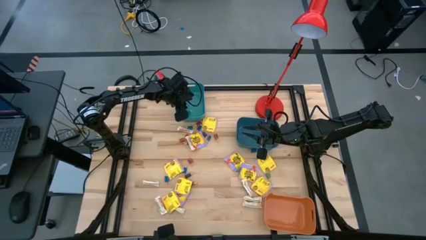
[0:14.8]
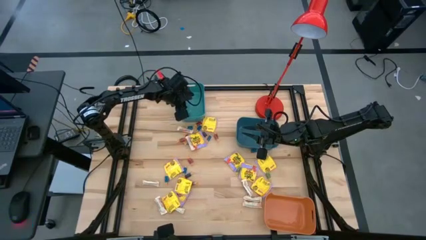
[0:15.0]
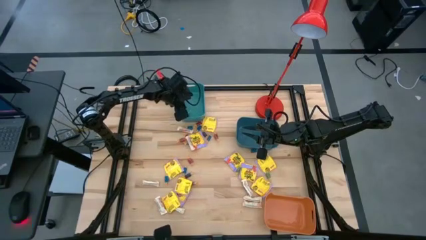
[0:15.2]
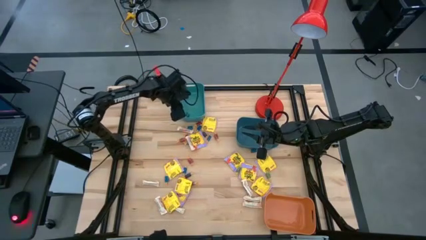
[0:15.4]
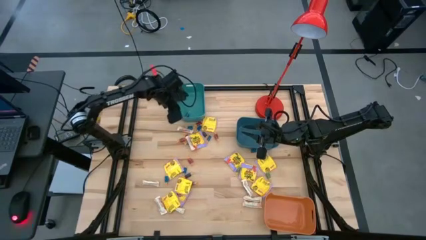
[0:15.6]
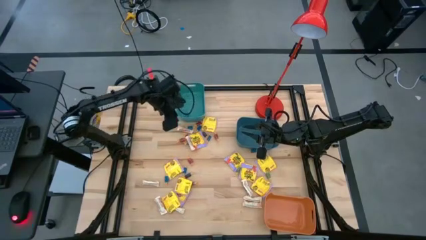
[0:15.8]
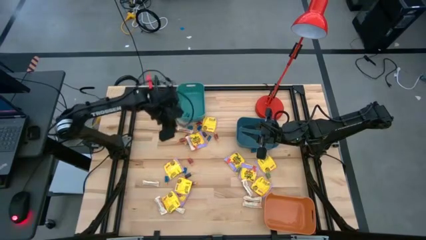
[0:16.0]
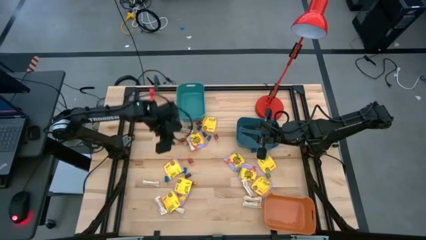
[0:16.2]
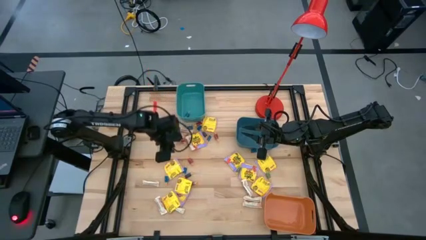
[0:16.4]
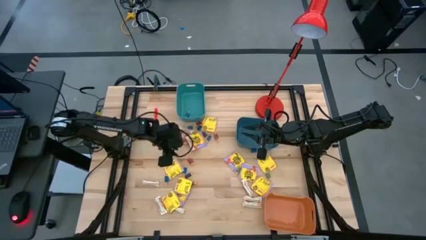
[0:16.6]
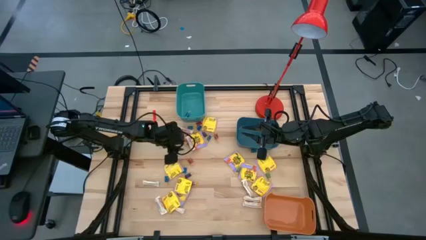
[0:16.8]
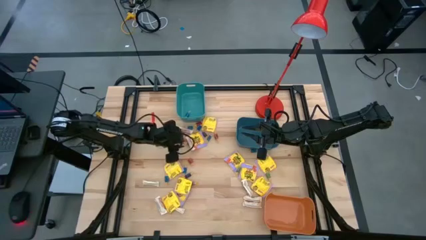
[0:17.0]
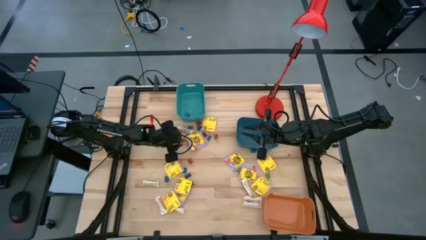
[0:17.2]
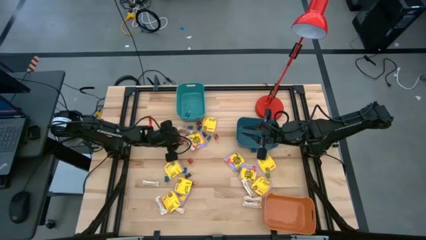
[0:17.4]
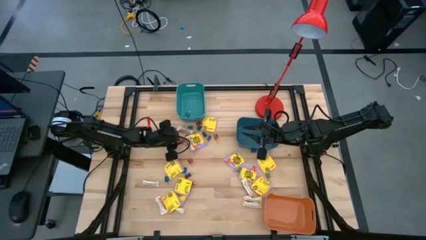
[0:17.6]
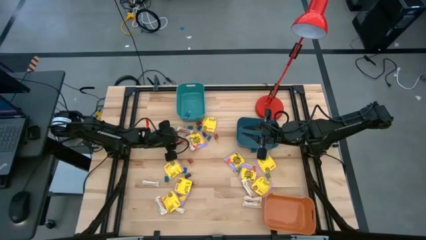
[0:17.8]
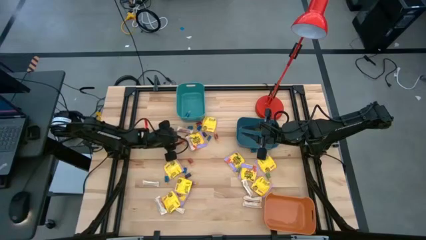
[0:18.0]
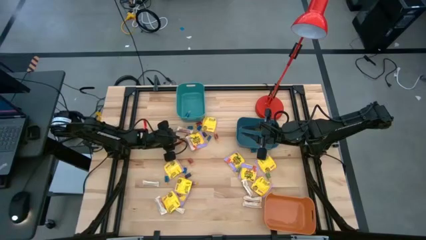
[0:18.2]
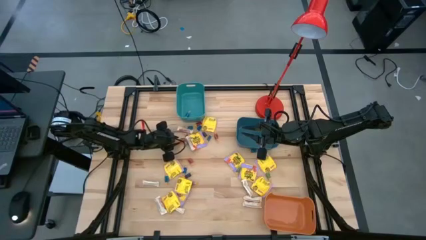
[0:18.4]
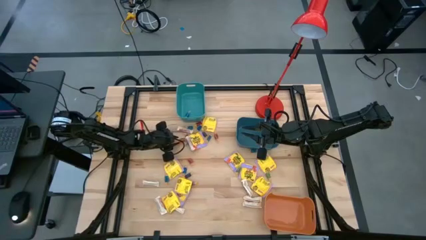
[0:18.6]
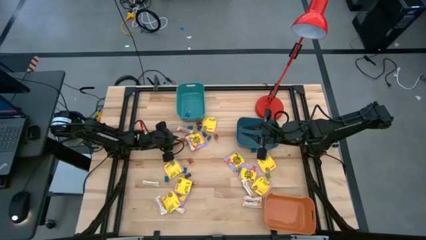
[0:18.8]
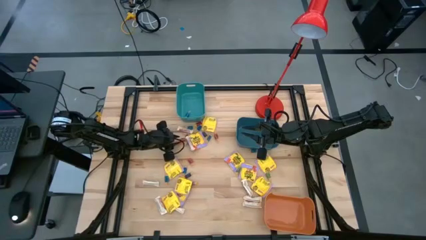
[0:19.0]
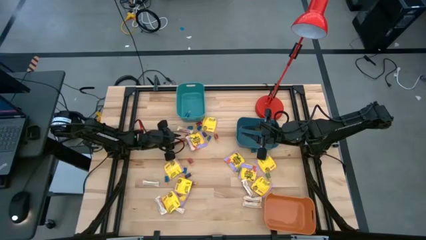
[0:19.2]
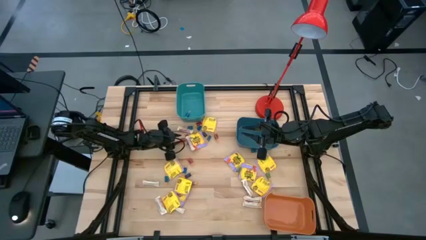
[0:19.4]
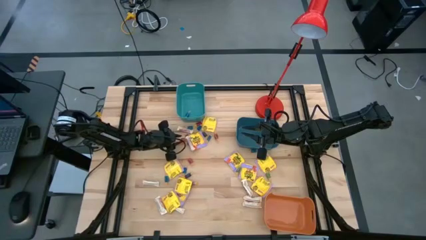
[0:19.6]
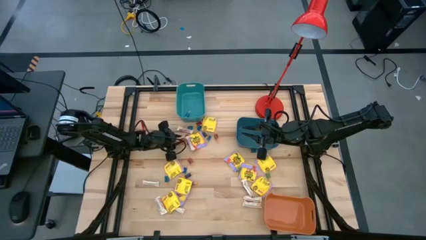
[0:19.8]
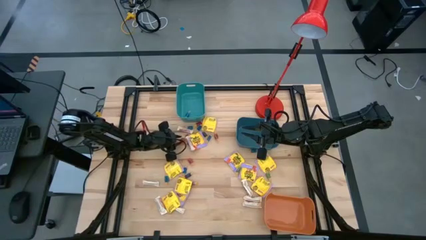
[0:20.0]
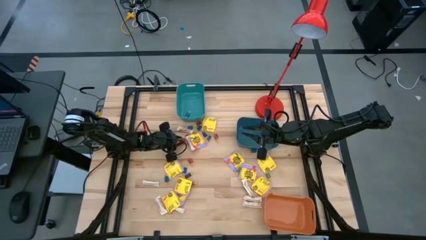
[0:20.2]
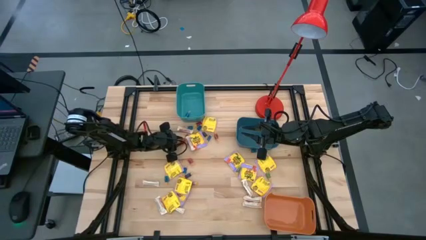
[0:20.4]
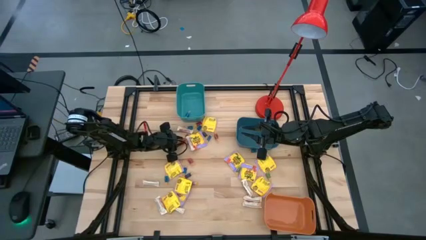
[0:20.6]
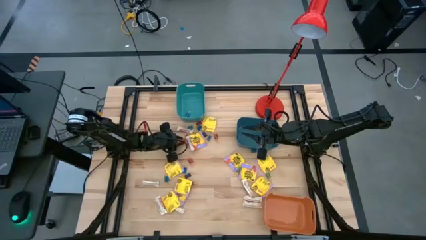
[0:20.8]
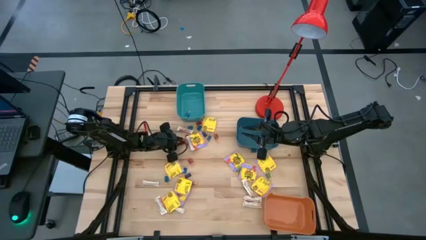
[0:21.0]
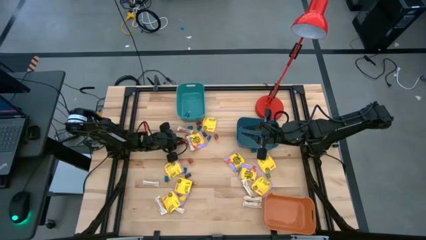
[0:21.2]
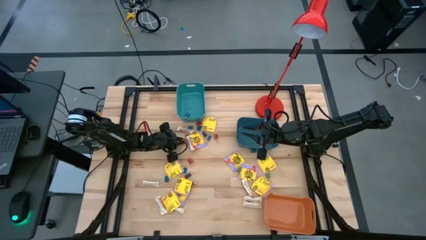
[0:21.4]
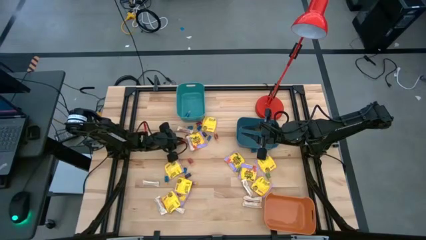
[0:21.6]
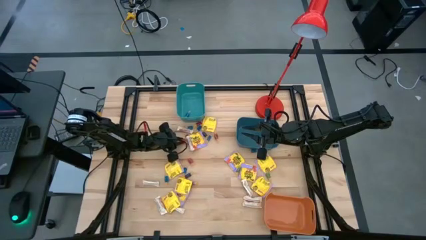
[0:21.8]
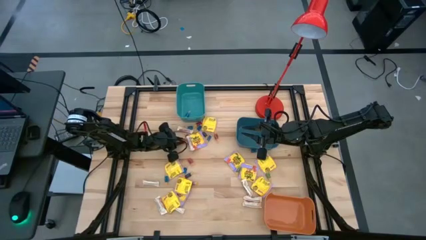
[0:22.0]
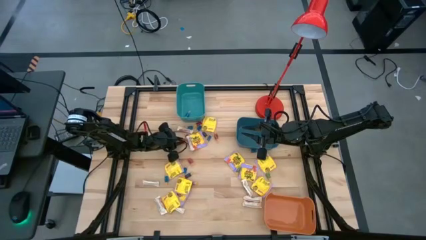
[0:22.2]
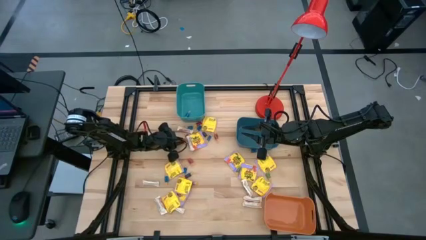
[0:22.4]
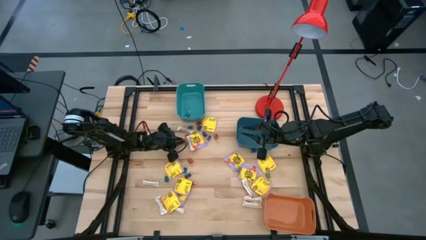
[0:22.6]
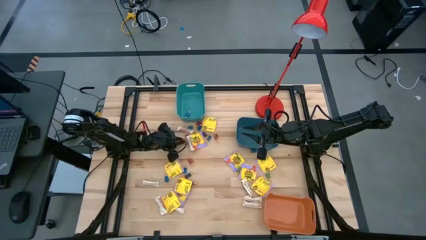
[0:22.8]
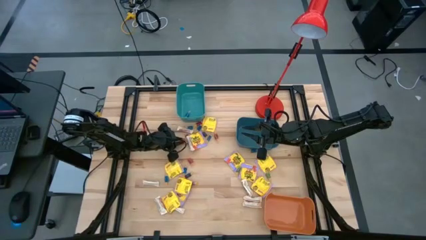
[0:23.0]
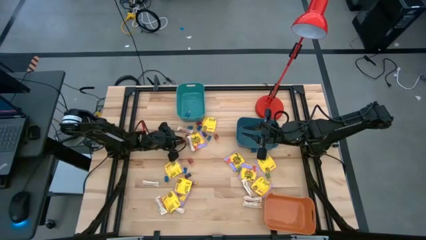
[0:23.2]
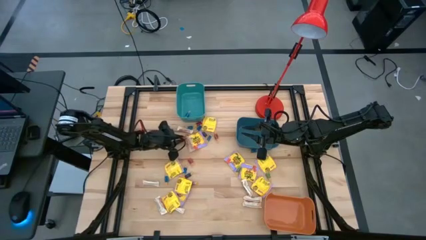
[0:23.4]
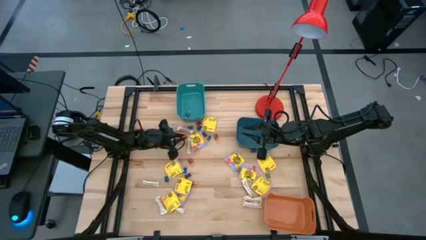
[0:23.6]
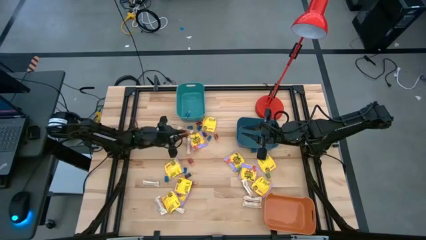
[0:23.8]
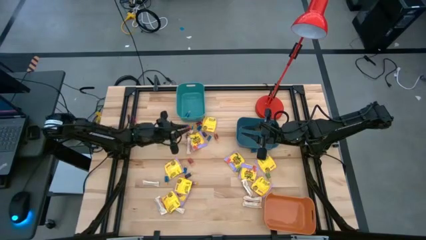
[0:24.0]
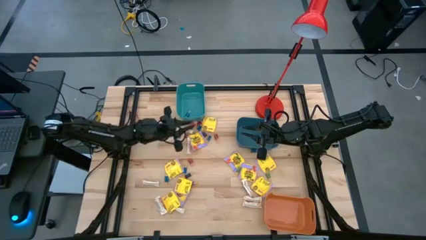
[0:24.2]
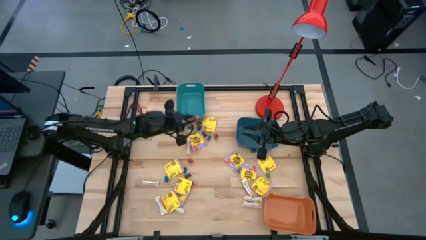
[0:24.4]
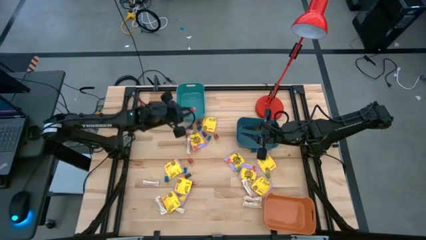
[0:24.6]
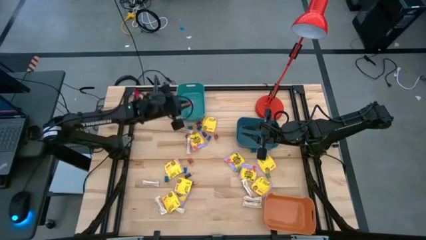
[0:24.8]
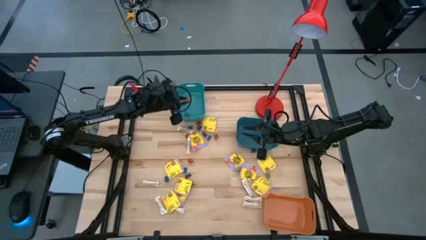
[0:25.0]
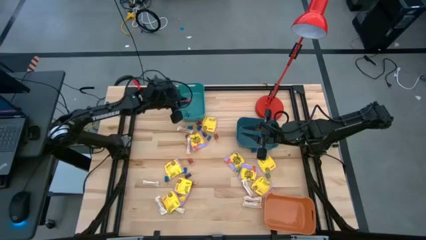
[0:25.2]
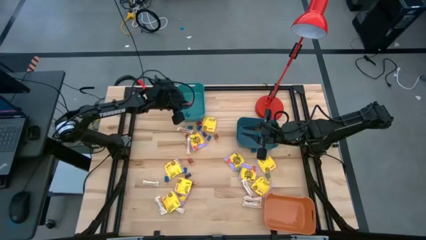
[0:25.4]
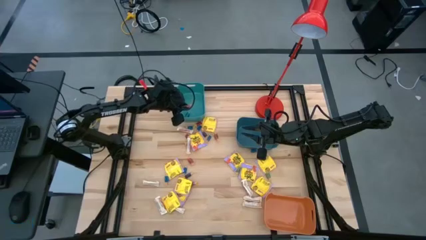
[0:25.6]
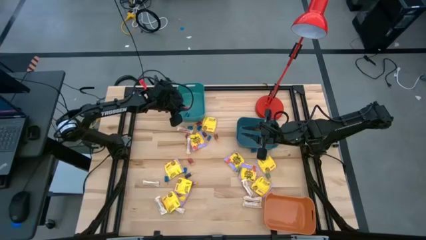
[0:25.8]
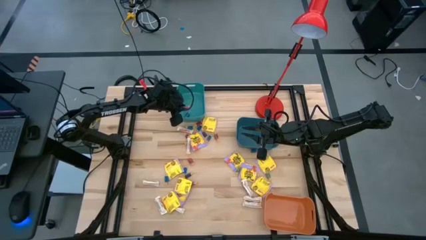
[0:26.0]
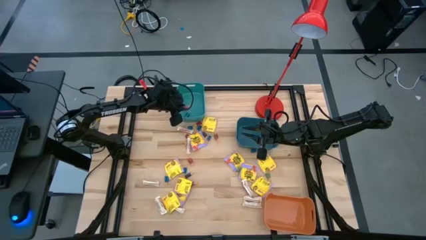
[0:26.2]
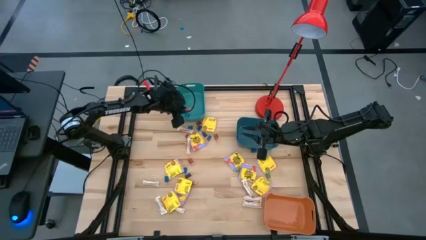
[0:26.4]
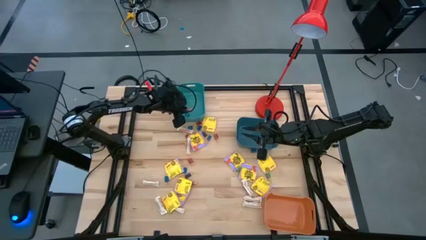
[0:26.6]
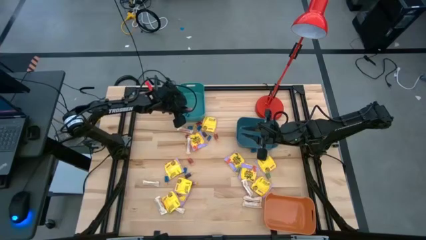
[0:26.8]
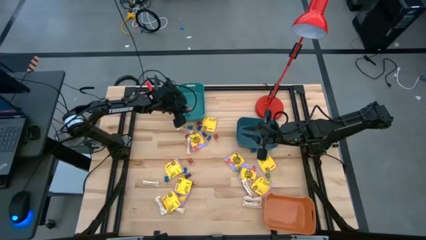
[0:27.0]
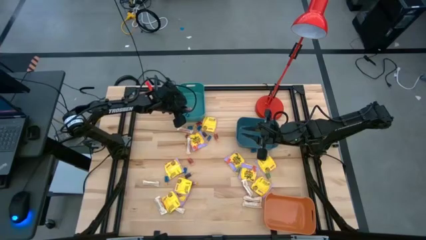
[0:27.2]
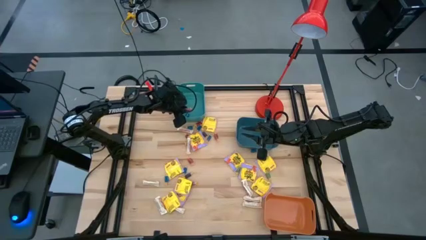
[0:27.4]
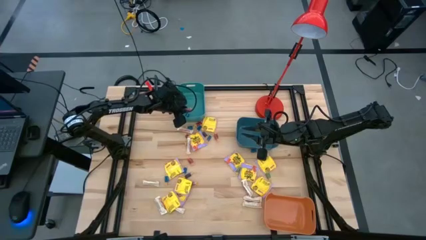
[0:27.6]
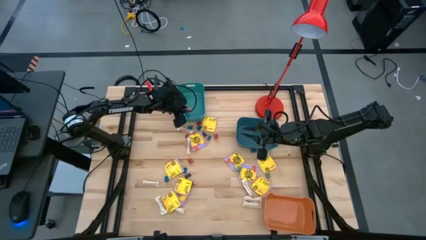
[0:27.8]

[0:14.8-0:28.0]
Task: Sort candy
Put the red candy into the green bin
